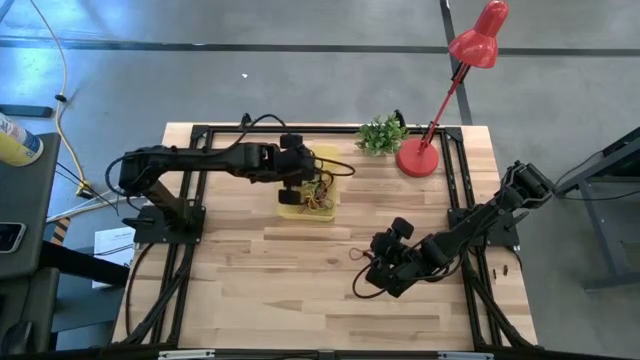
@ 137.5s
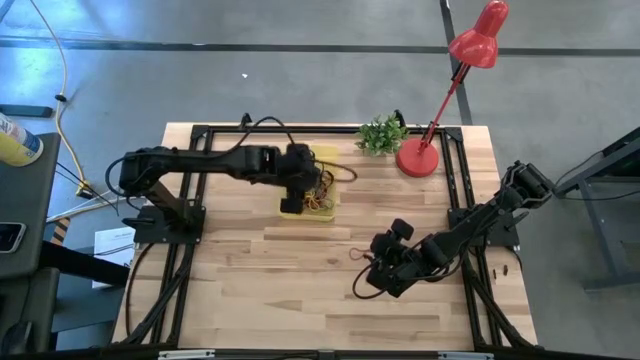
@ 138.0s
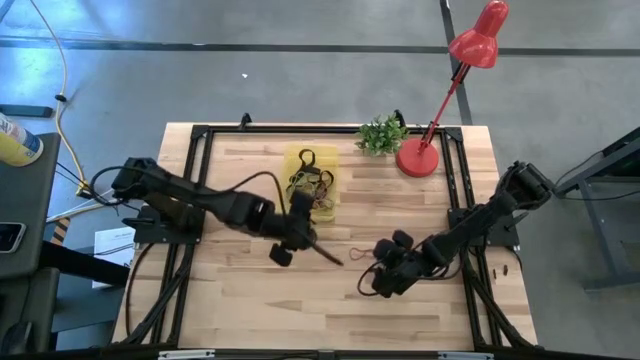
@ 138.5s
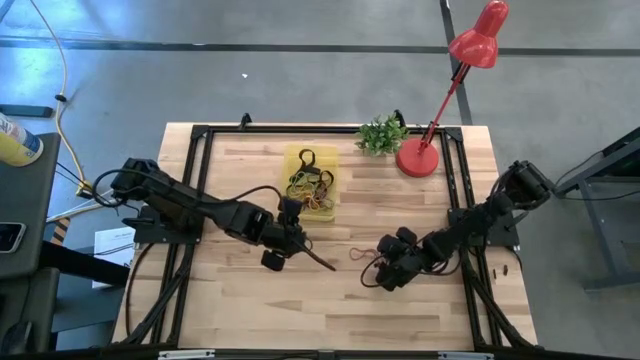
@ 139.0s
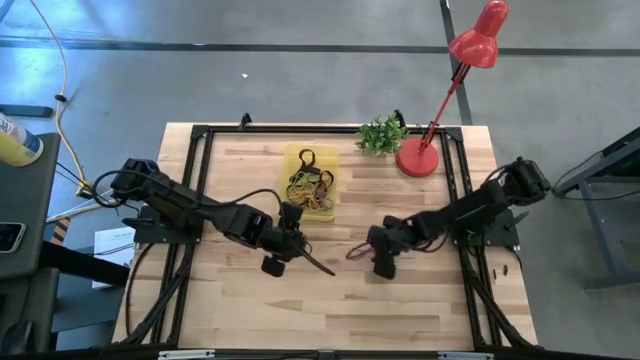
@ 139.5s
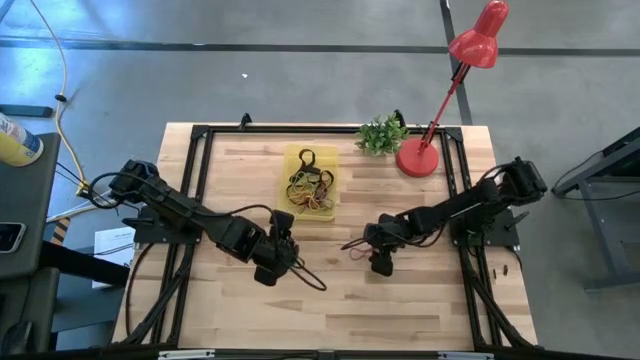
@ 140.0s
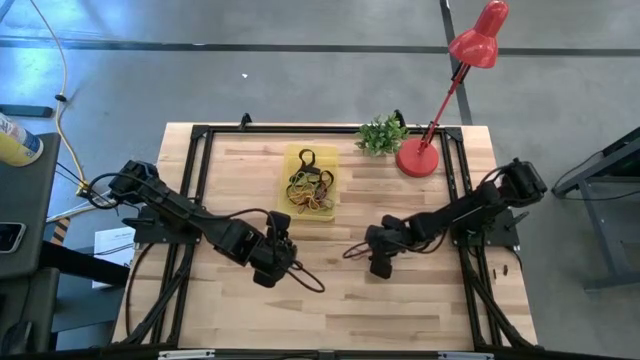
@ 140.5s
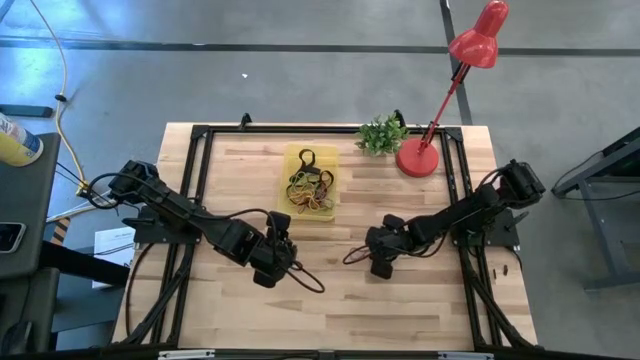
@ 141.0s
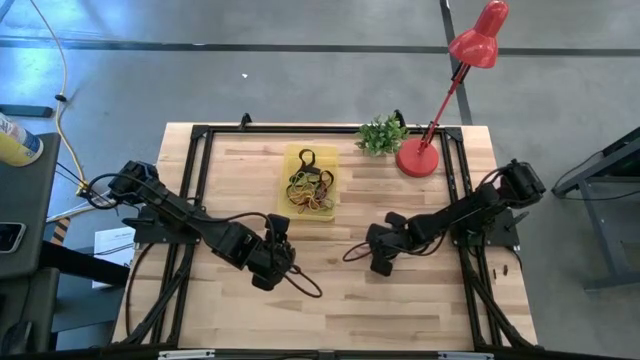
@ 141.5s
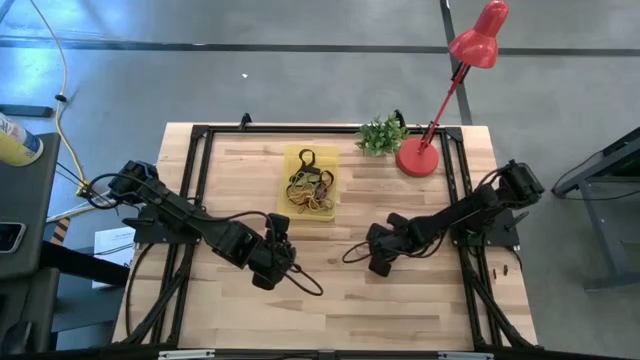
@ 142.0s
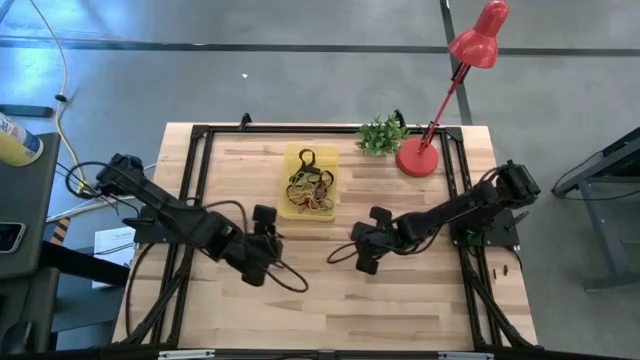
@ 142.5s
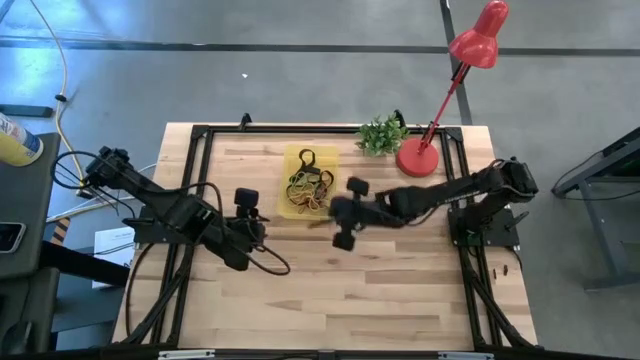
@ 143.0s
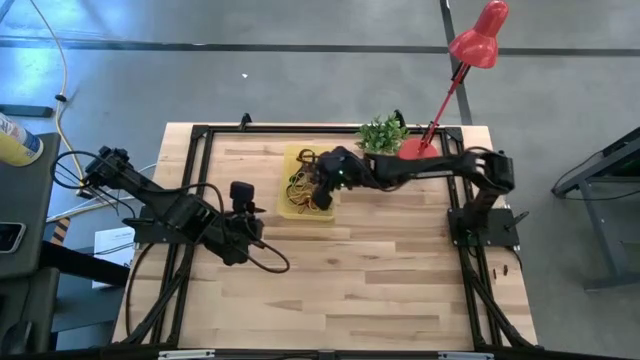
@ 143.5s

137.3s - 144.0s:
Task: Pick and place rubber bands into bin
Put the red rubber band into the yellow bin

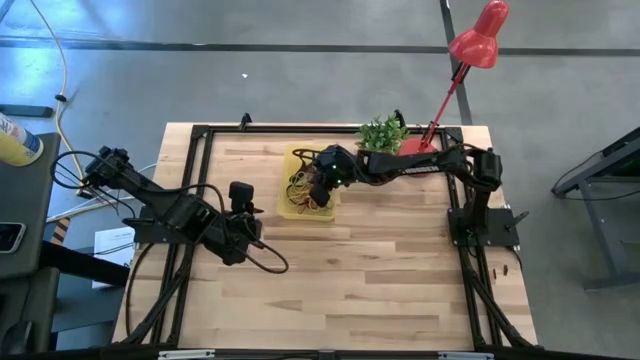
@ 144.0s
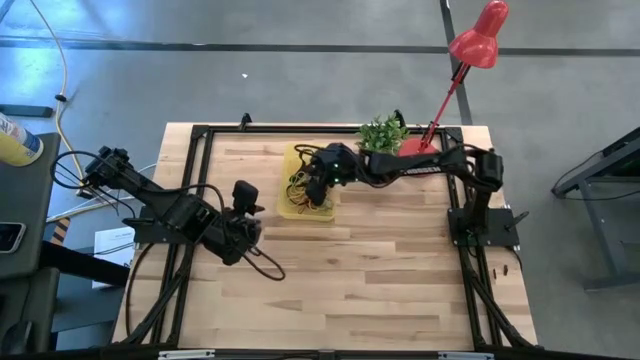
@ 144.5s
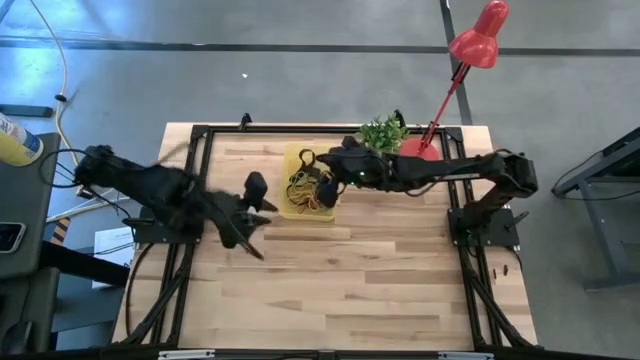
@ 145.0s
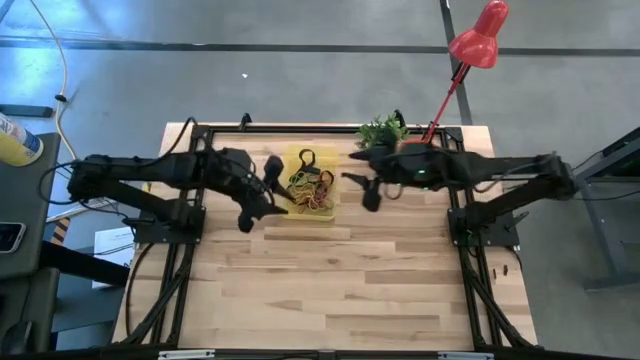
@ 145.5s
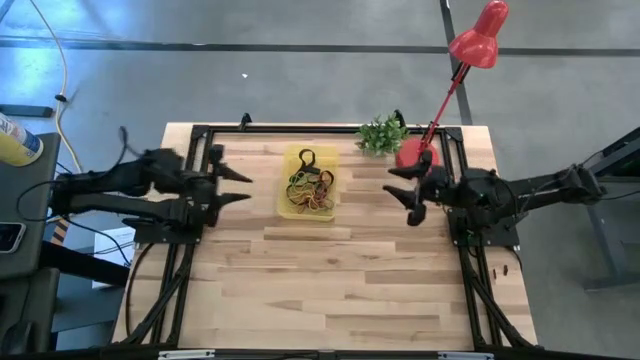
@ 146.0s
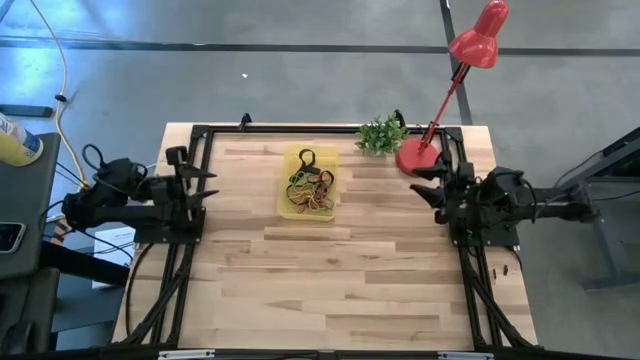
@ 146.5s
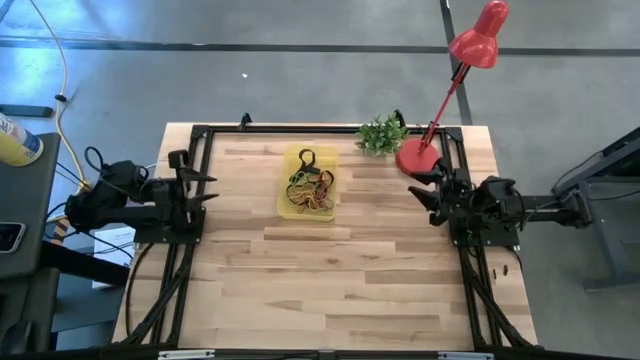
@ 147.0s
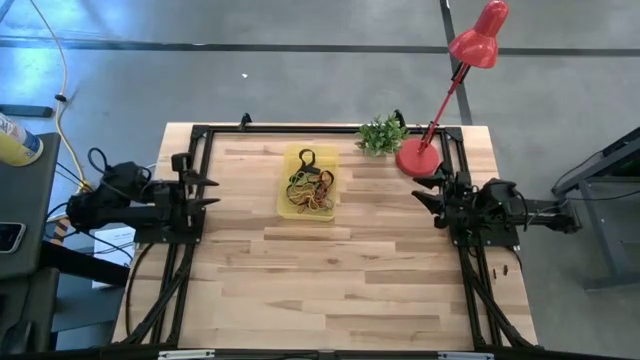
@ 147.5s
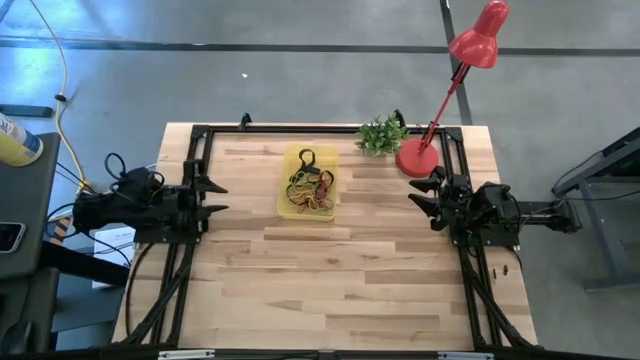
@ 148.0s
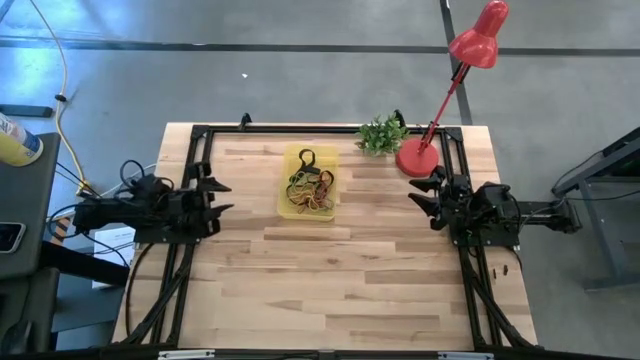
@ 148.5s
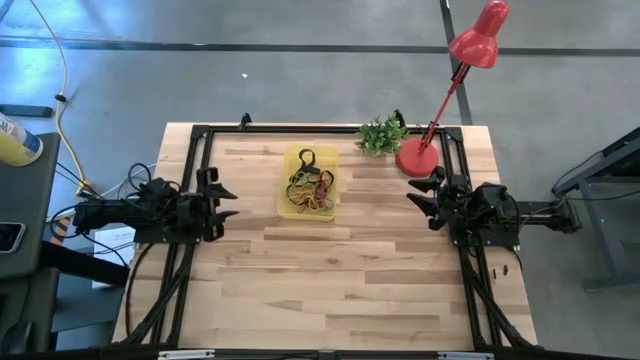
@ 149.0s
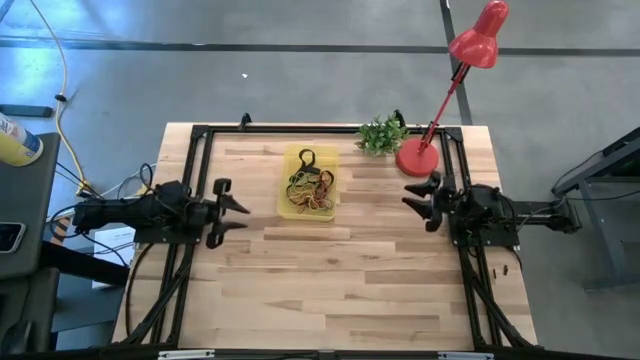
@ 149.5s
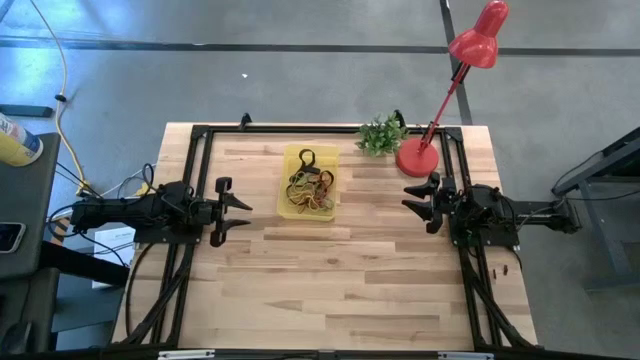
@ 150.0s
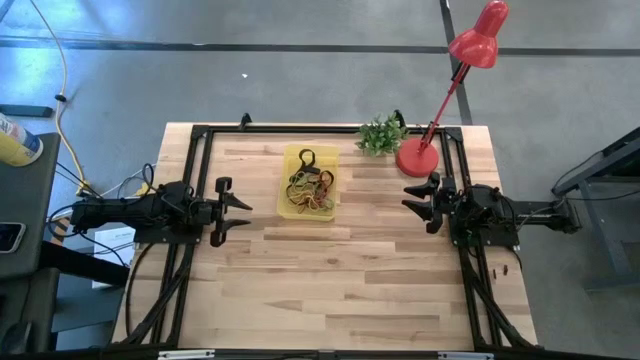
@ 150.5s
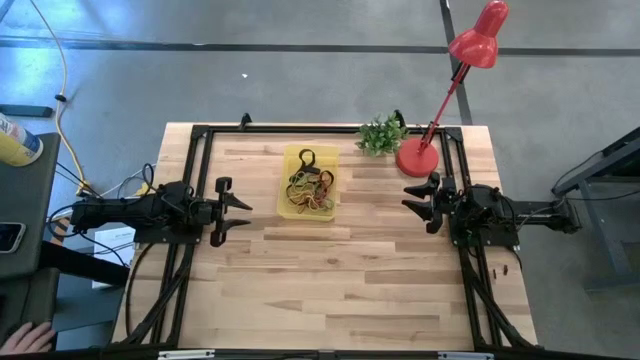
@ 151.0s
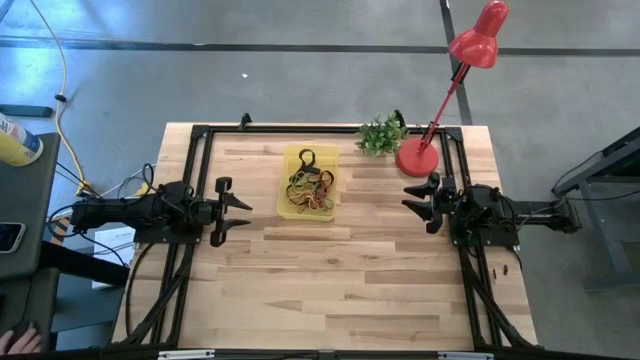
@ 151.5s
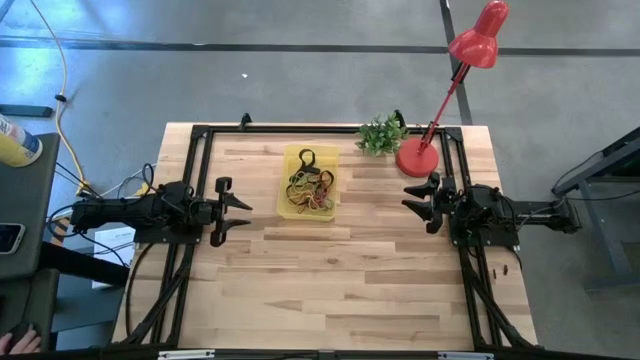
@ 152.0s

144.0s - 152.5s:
Return to Home Position

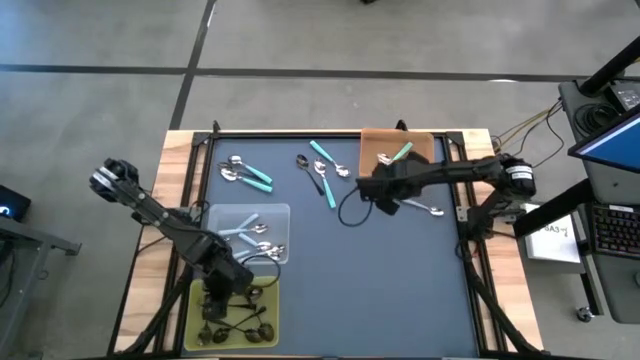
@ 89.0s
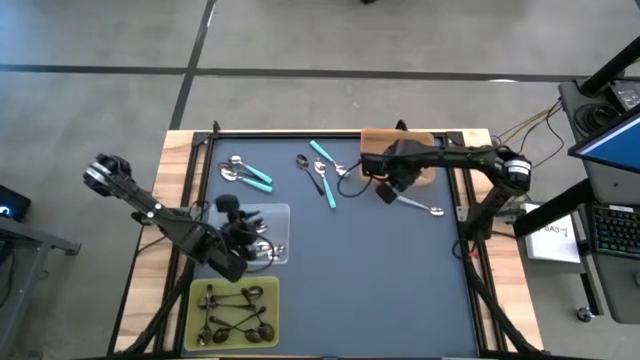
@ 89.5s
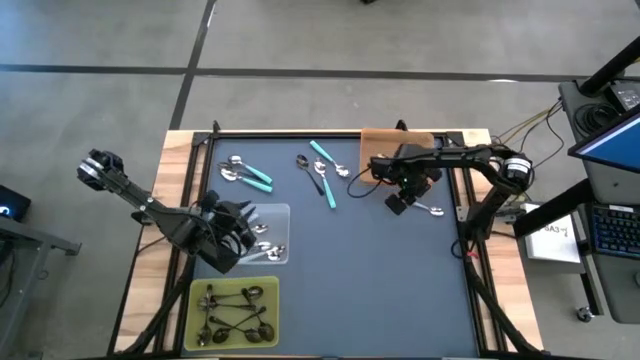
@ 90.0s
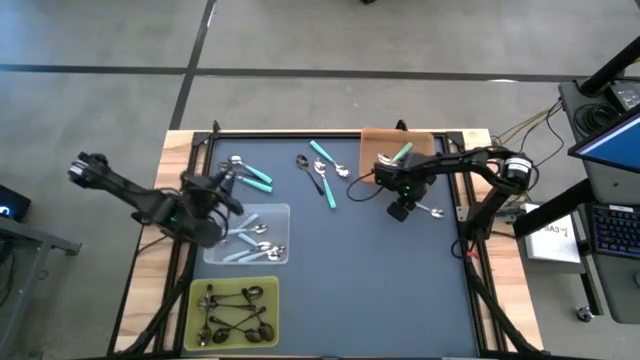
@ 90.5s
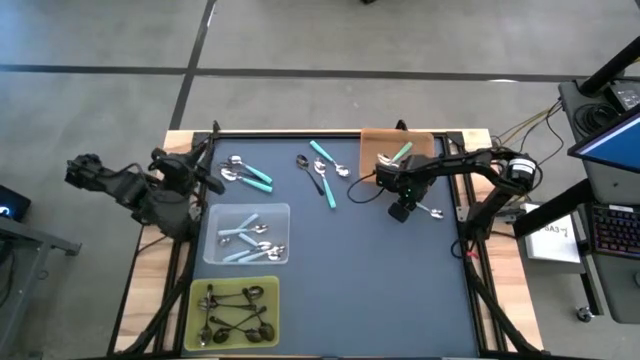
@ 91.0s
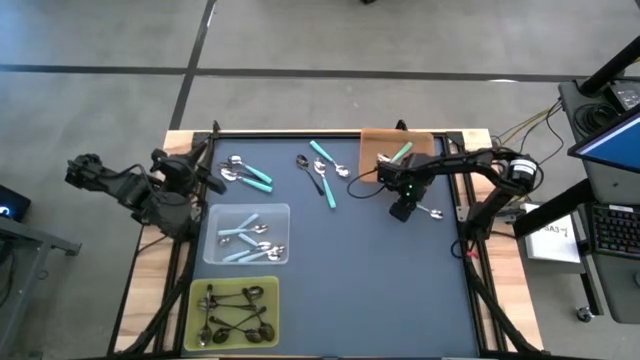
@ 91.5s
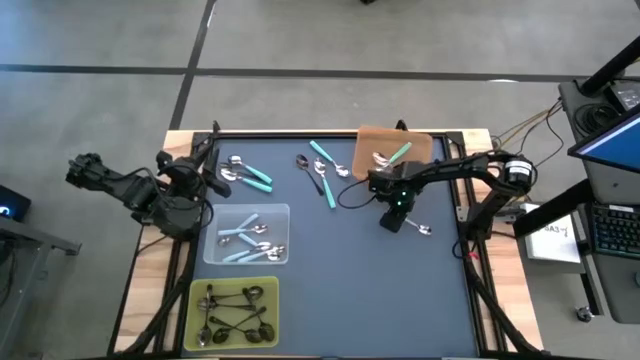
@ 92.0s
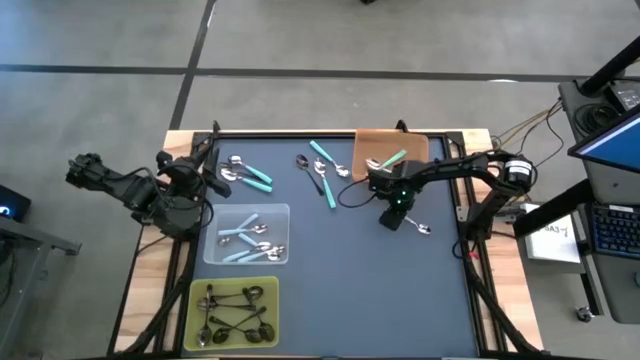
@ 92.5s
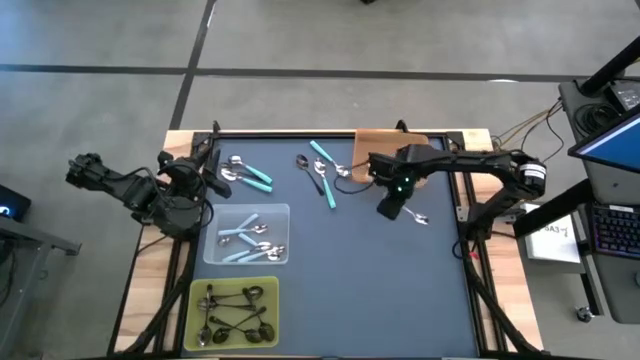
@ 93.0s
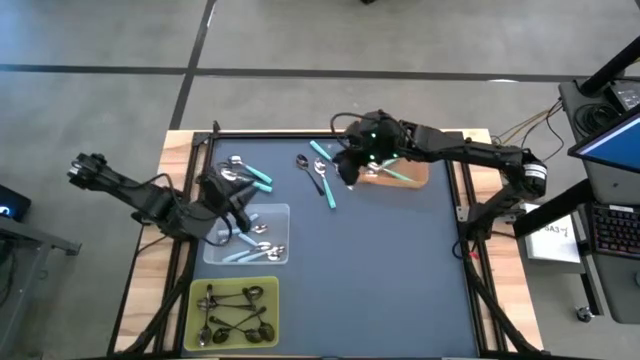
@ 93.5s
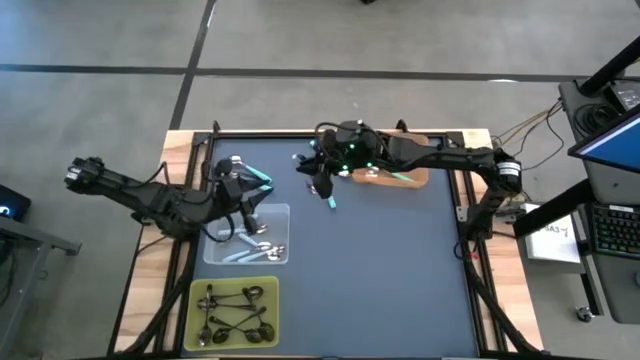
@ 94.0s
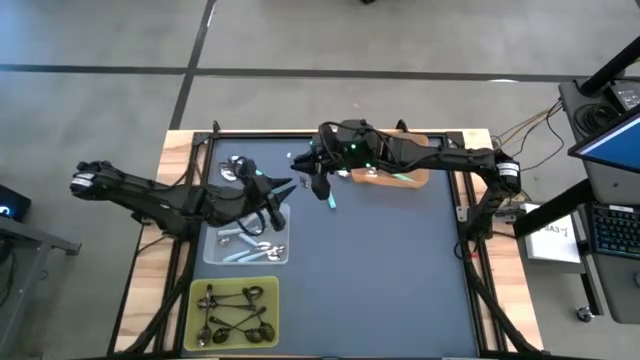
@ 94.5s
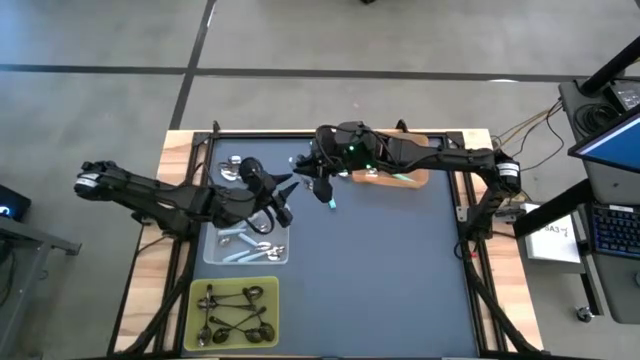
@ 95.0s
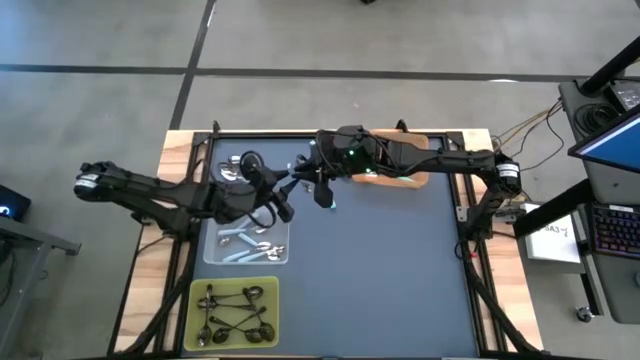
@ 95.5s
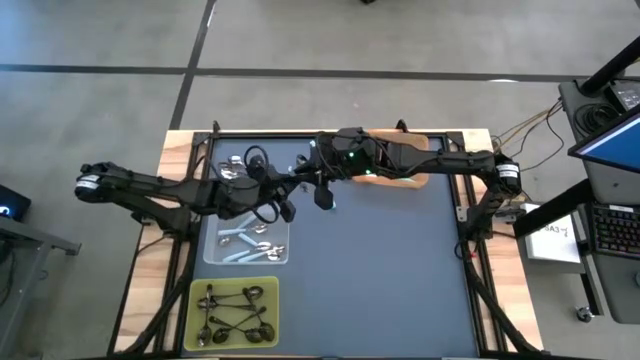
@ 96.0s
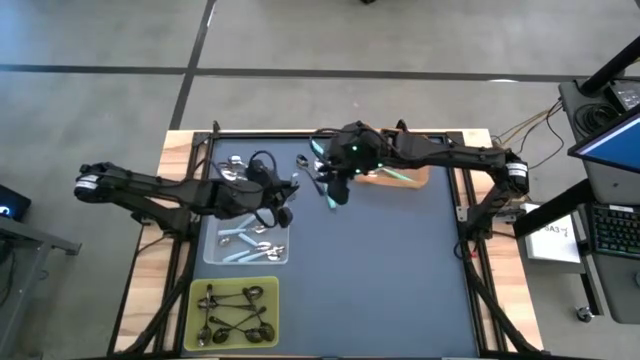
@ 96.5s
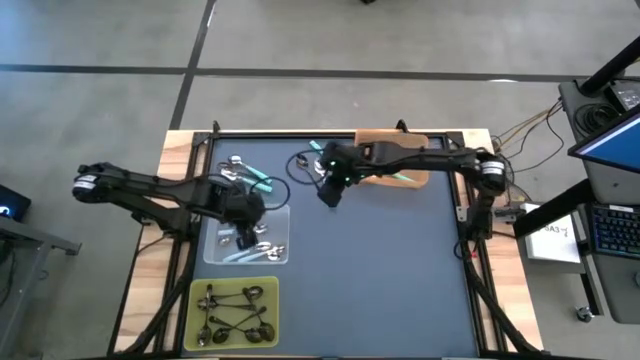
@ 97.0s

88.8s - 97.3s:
Task: Sort silverware by color (type)
Put the light blue spoon into the white bin
